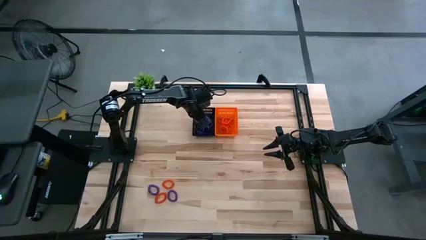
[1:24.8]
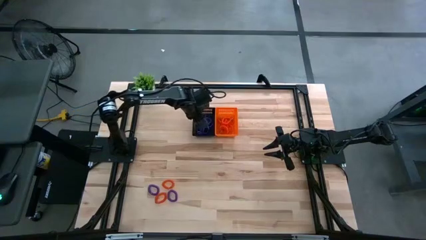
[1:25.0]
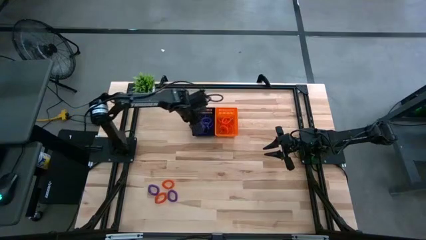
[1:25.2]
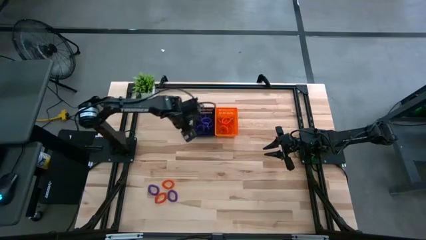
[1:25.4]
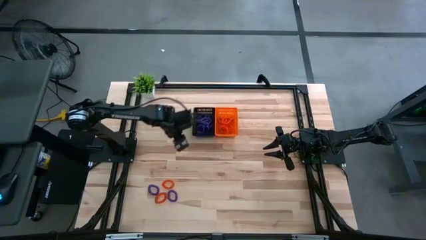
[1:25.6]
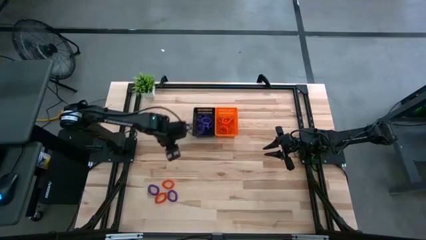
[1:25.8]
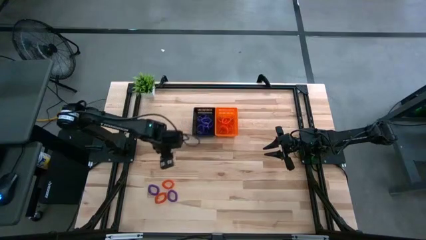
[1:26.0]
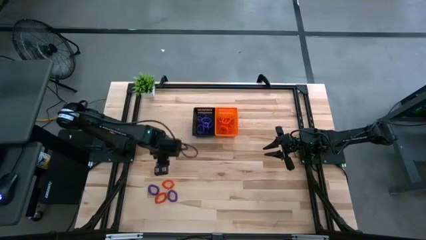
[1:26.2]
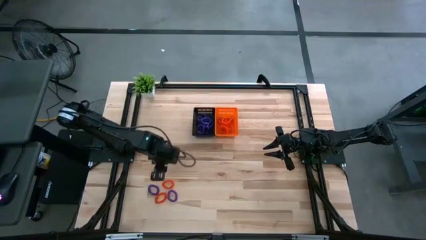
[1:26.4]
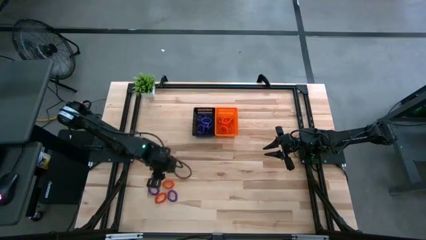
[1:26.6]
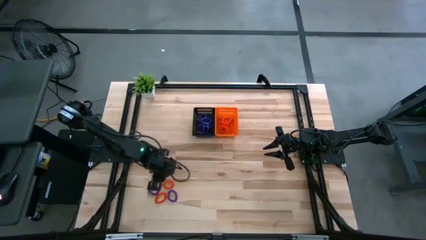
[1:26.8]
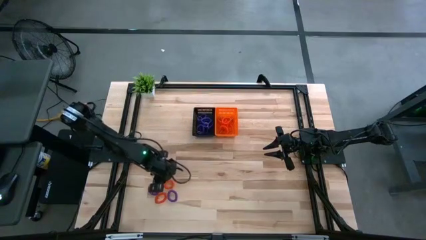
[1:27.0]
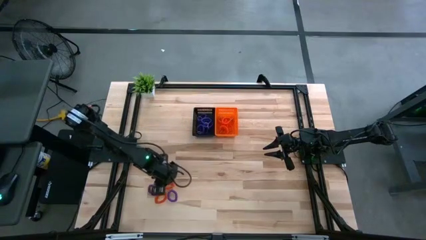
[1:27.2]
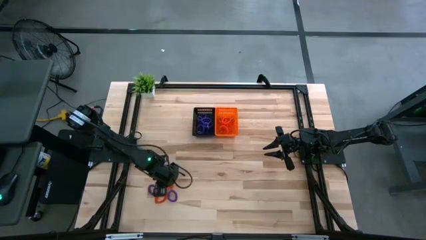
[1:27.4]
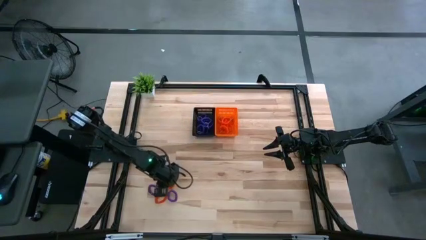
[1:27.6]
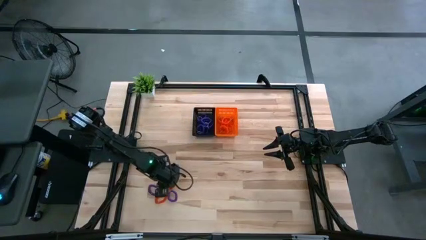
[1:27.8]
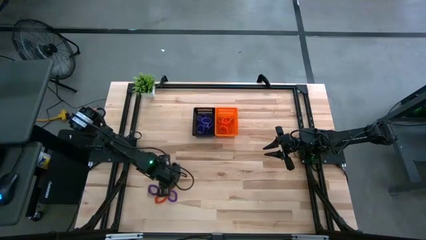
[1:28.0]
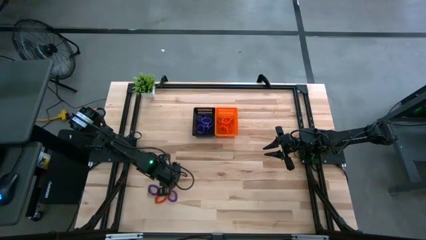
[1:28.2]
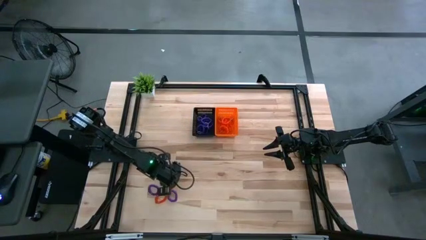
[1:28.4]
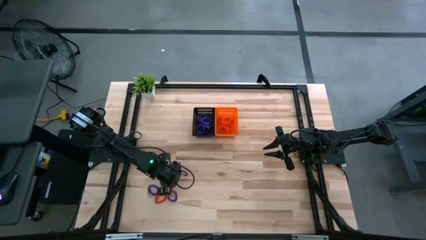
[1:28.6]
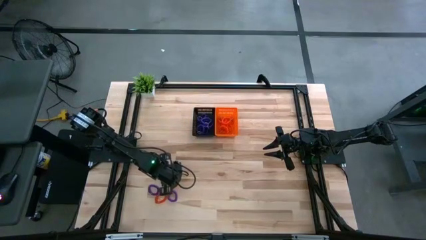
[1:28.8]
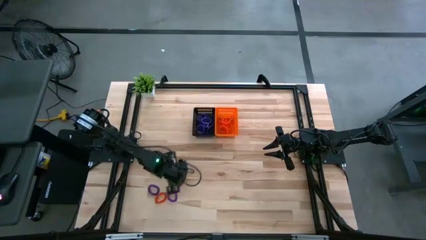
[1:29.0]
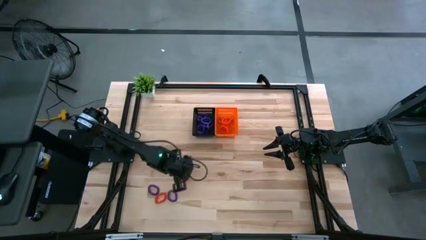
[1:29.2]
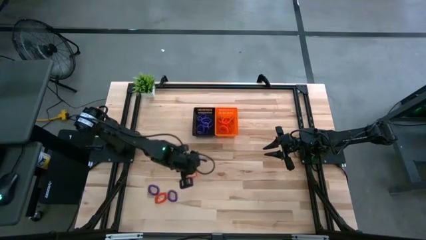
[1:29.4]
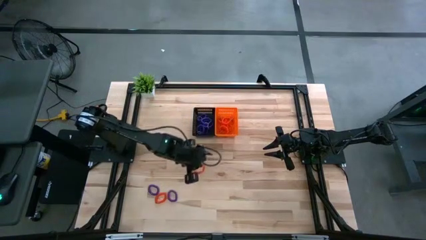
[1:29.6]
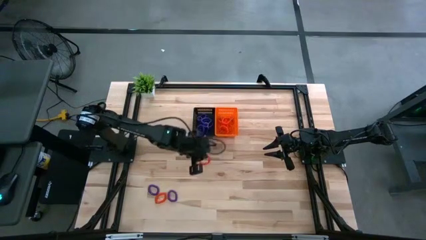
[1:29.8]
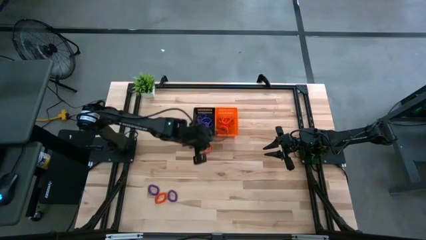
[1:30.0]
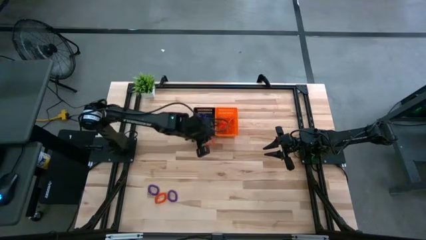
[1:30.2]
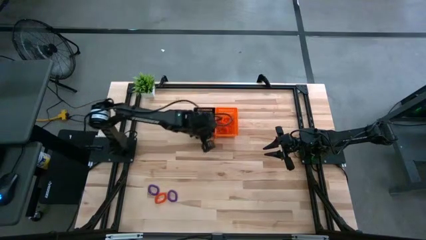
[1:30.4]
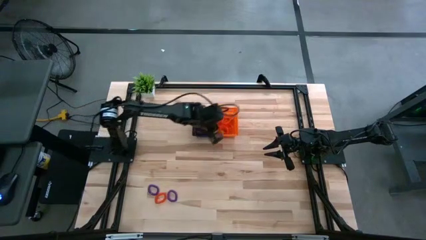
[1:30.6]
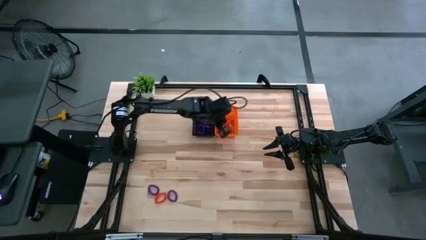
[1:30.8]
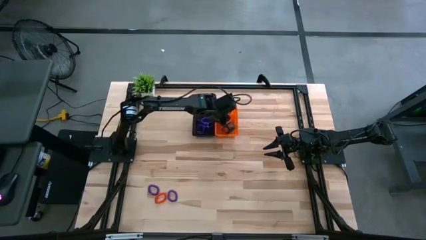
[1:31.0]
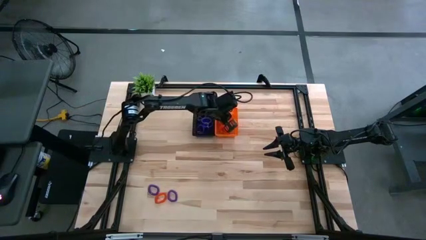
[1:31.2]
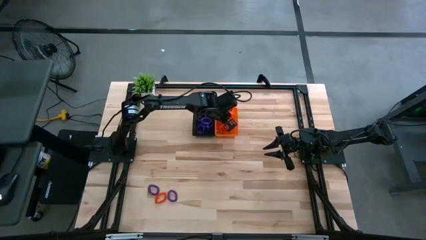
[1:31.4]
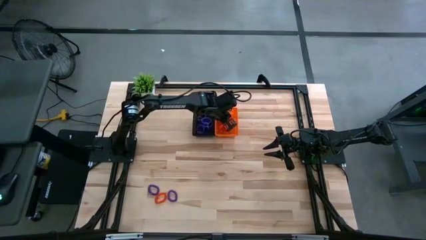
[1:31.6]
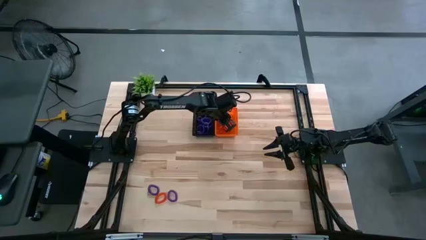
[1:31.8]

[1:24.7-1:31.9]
Task: Sort spring keychains into baskets
Put the spring keychain into the orange basket

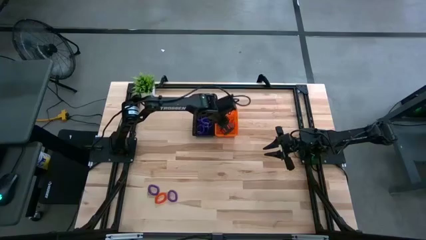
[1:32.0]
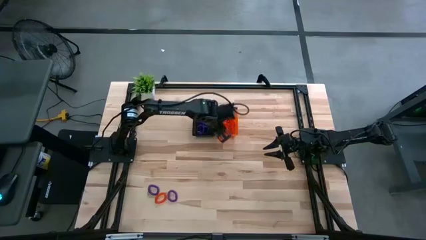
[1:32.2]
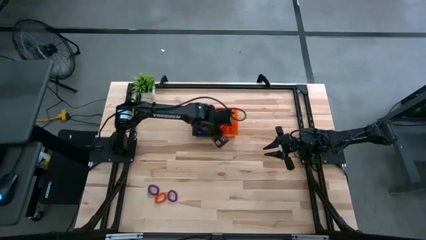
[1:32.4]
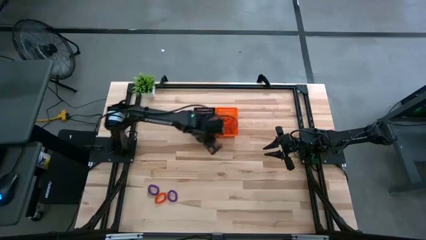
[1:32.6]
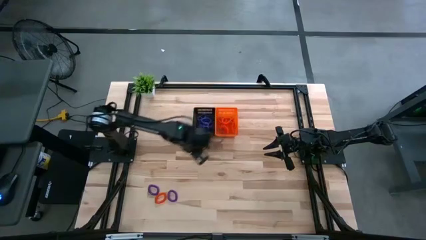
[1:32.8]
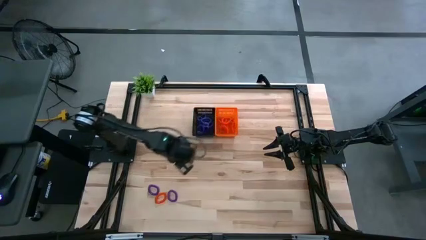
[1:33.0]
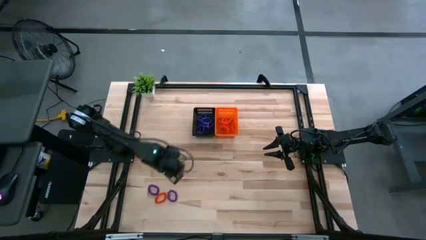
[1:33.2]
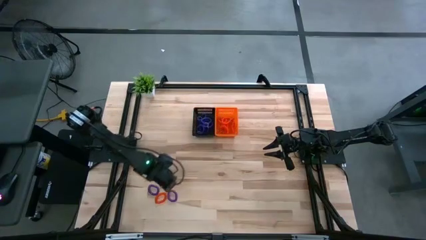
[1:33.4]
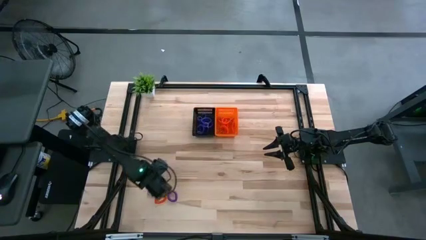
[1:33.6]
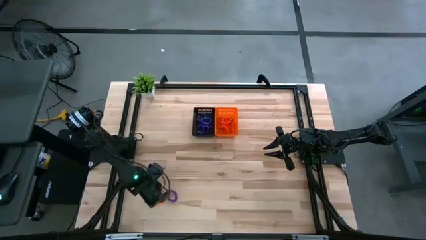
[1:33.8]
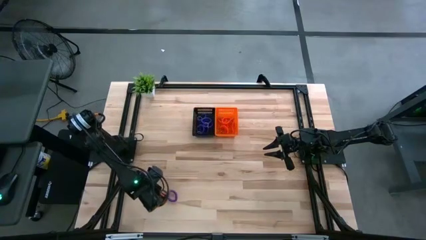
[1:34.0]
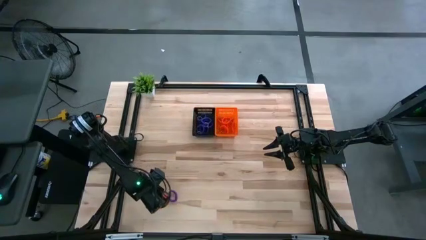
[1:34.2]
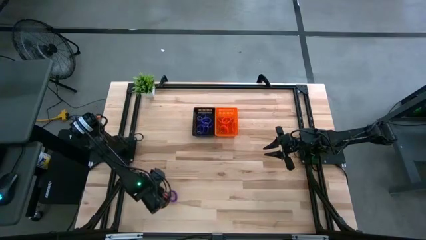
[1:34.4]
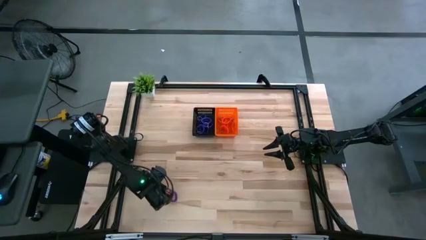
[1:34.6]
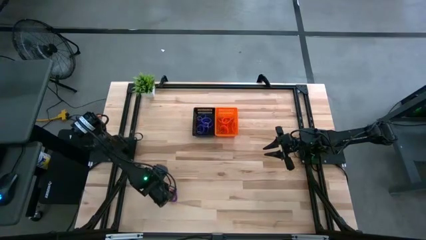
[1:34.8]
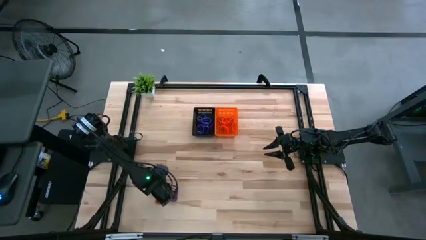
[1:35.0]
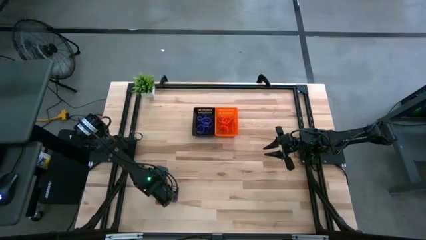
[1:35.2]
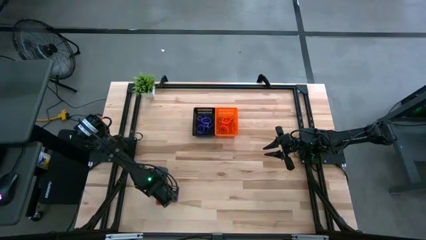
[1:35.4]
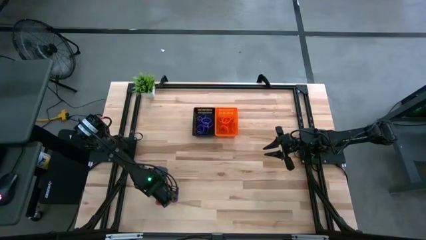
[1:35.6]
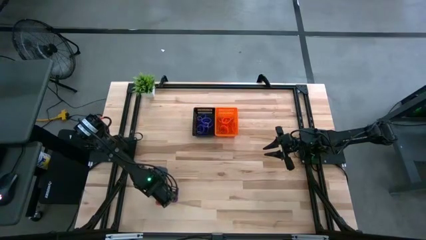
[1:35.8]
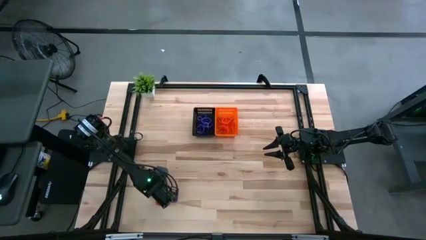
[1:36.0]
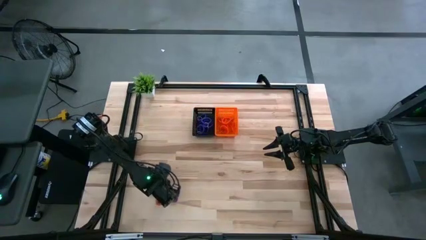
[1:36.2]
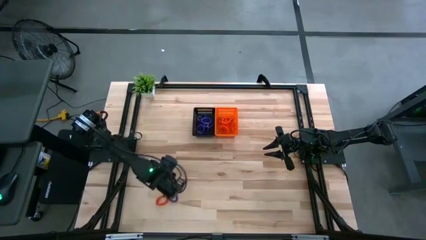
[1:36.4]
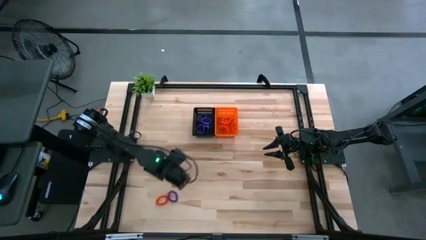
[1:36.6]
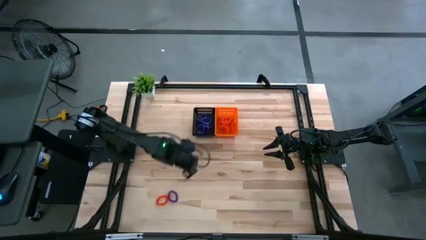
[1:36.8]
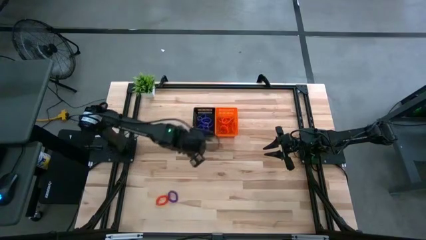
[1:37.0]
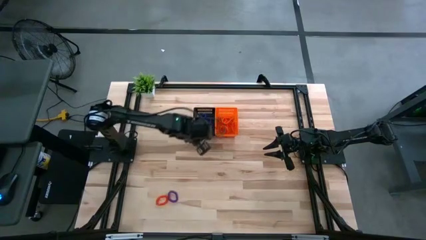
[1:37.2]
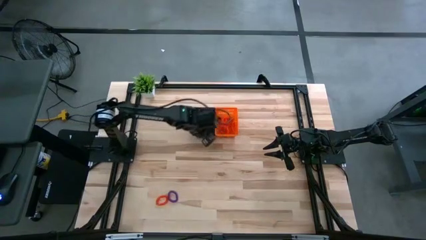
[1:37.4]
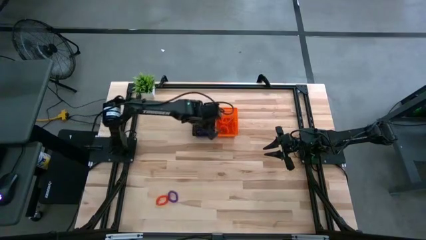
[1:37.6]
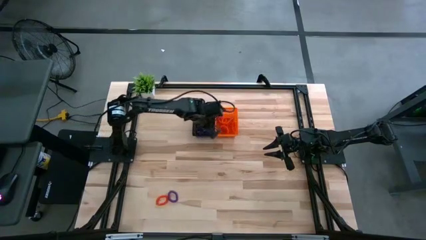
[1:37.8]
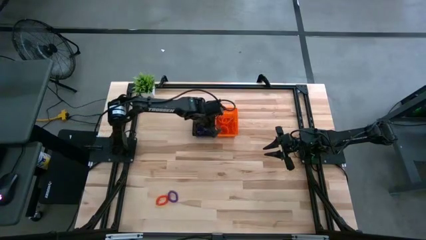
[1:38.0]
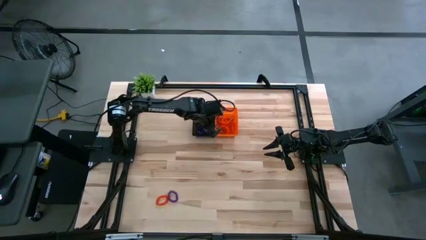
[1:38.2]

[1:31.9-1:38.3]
Put the purple spring keychain into the black basket

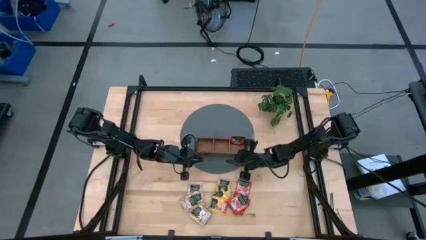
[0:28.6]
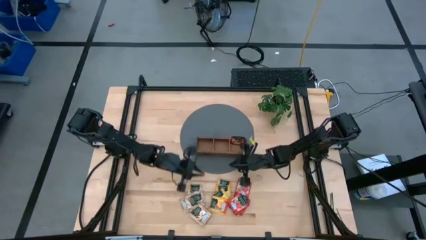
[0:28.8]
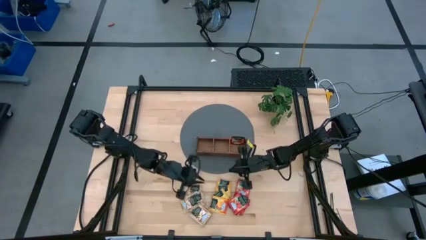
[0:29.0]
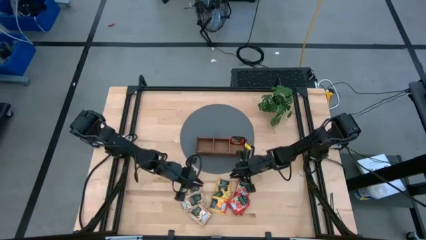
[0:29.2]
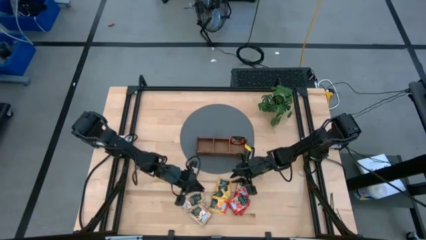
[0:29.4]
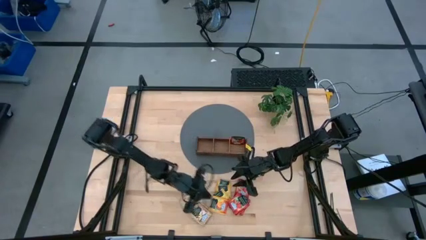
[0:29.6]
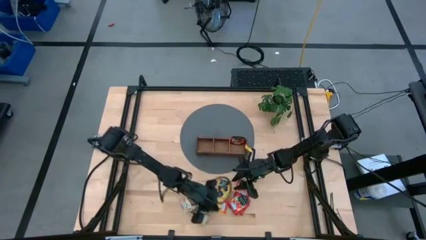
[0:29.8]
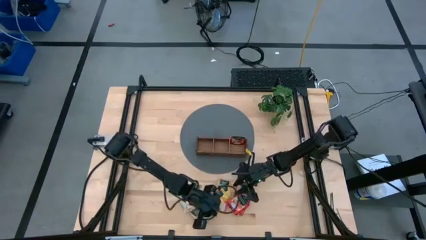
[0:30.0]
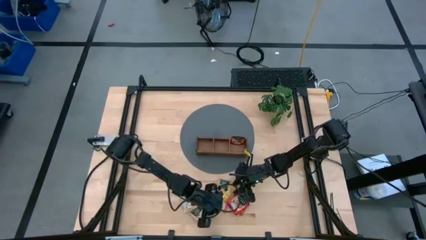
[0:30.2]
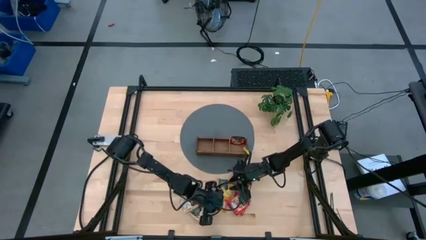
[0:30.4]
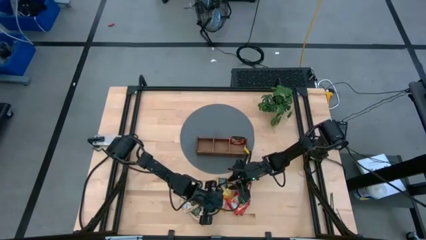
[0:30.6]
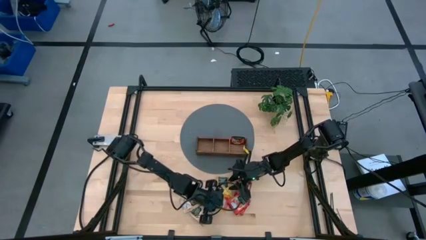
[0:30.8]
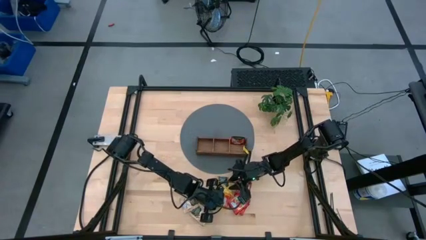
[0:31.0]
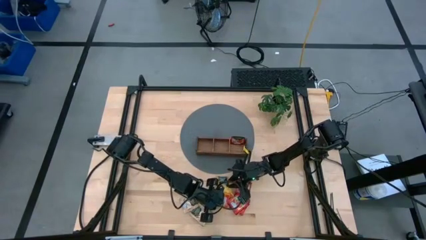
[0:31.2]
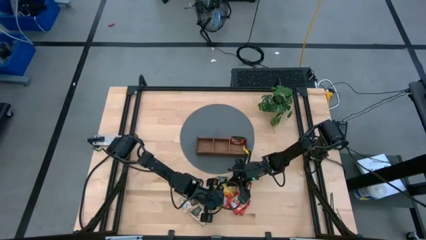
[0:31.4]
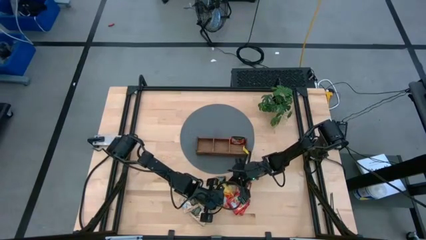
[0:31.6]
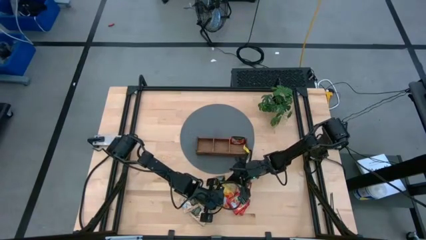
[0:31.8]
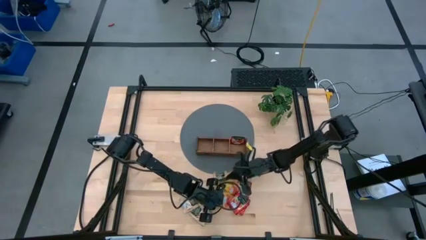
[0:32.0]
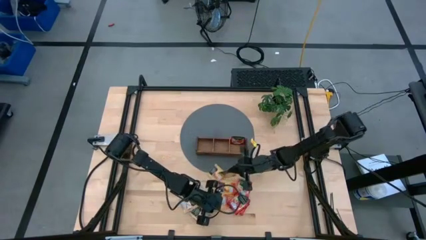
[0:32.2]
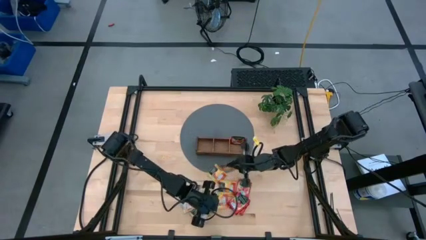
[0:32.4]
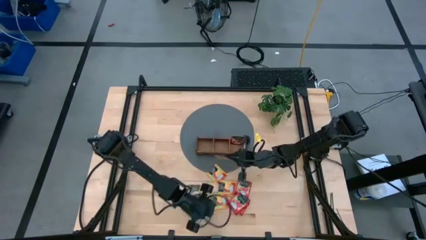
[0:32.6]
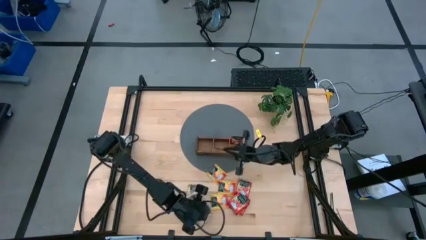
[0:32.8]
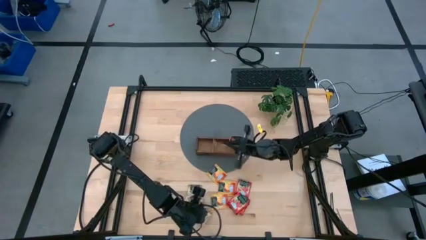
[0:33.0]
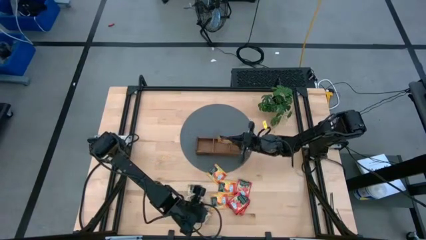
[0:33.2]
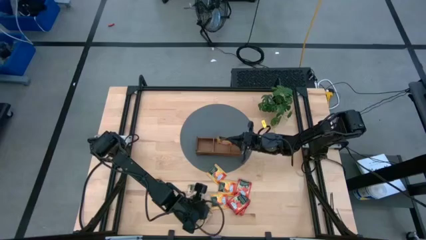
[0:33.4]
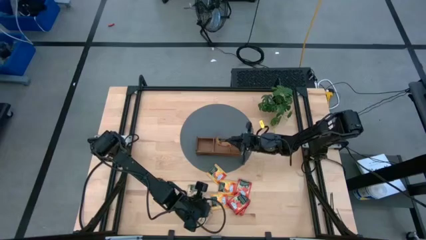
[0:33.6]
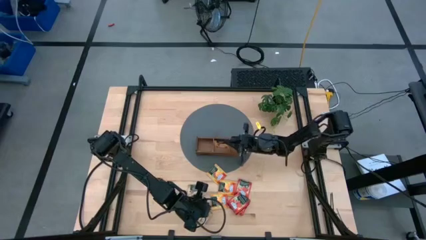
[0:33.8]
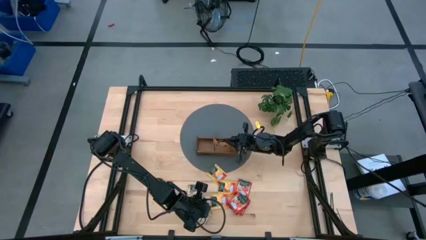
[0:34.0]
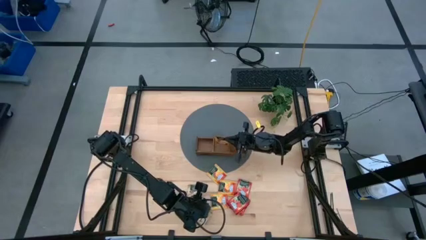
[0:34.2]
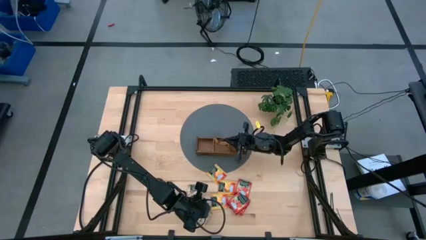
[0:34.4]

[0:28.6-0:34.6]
Task: Pick & Place Tea
Put the yellow tea bag into the middle section of the wooden organizer
